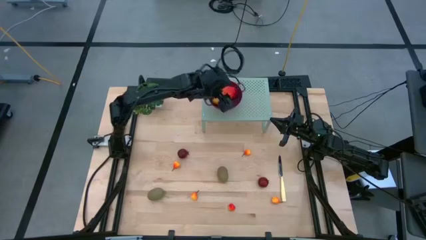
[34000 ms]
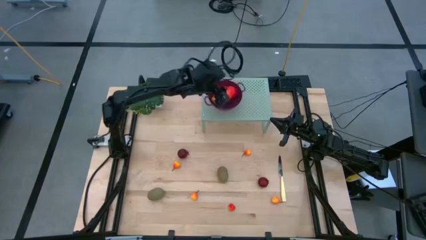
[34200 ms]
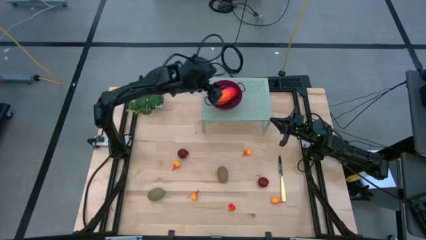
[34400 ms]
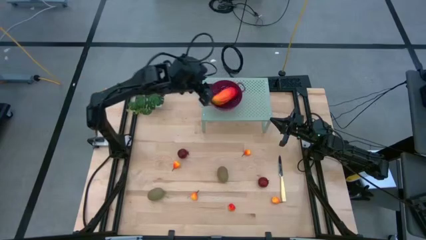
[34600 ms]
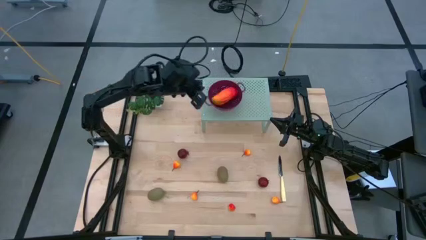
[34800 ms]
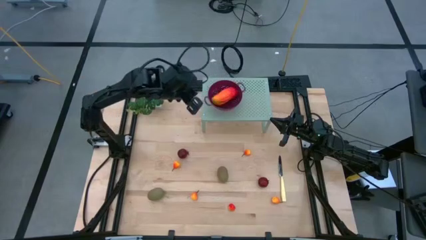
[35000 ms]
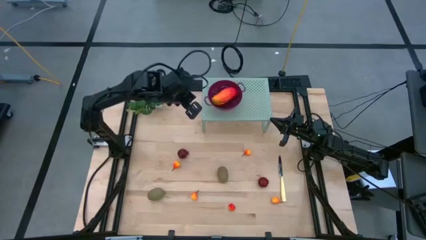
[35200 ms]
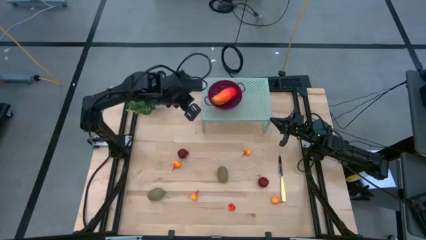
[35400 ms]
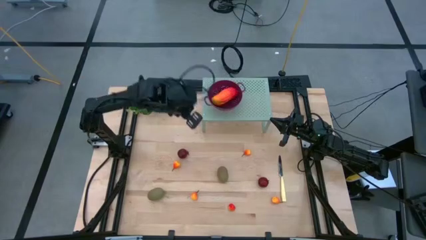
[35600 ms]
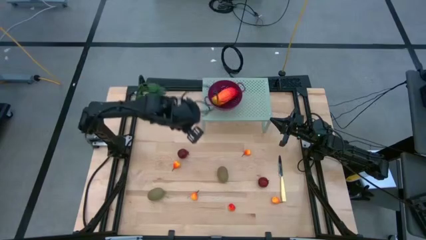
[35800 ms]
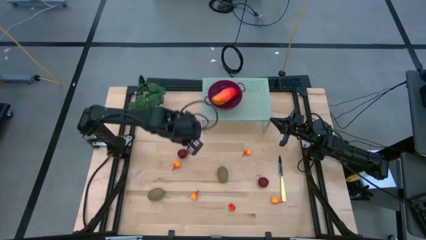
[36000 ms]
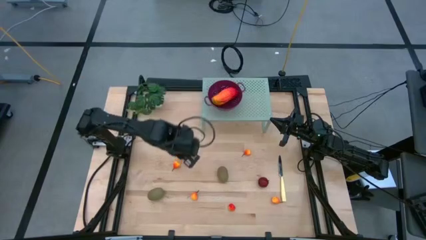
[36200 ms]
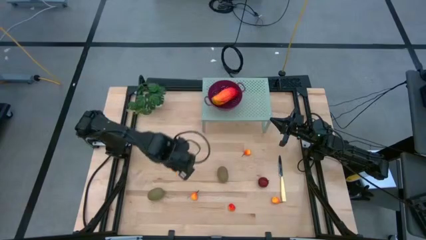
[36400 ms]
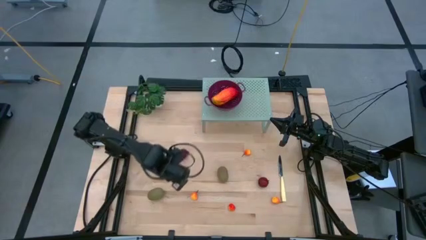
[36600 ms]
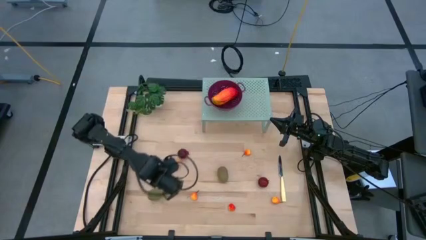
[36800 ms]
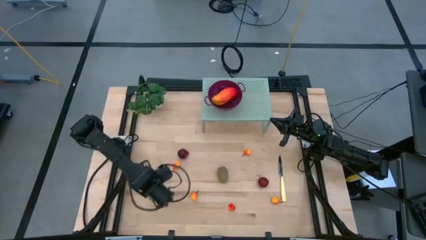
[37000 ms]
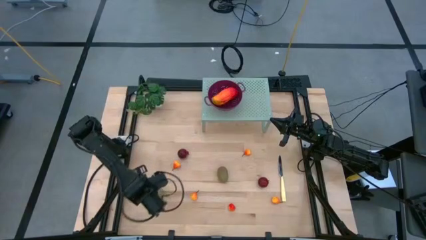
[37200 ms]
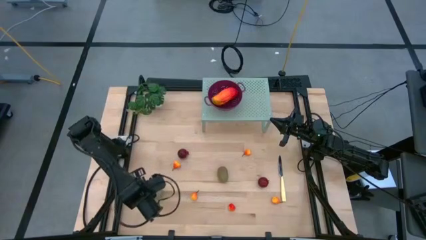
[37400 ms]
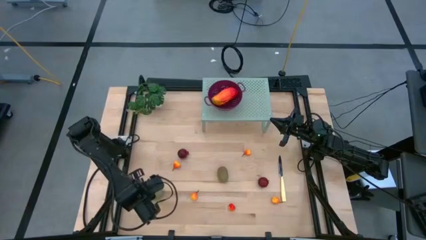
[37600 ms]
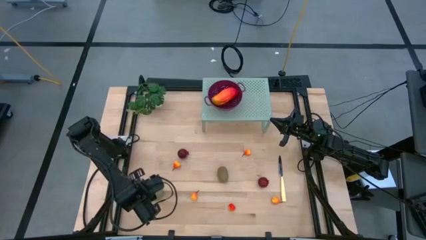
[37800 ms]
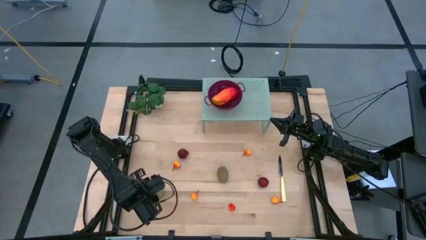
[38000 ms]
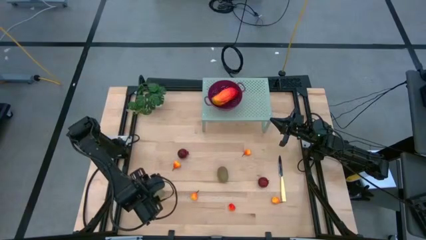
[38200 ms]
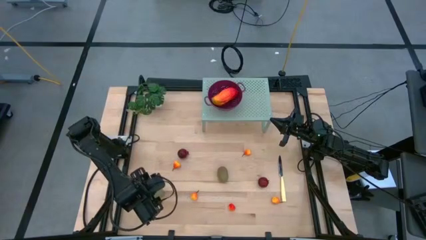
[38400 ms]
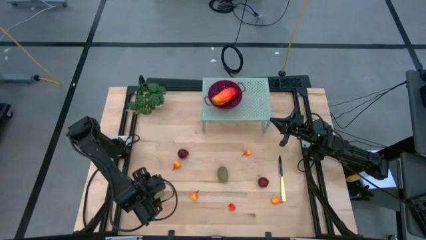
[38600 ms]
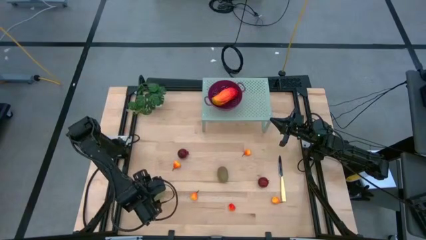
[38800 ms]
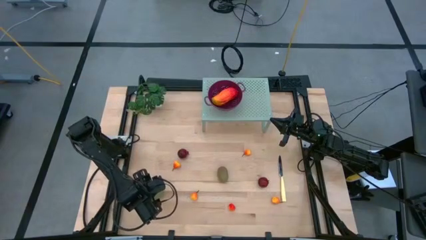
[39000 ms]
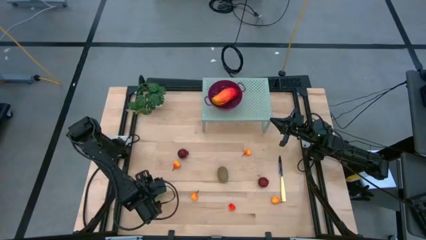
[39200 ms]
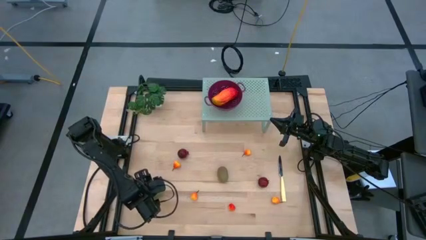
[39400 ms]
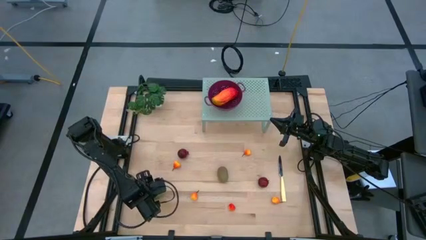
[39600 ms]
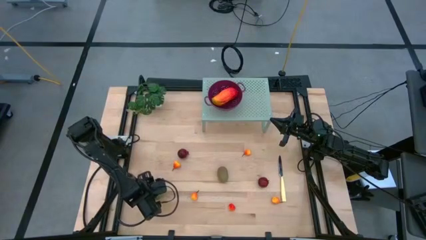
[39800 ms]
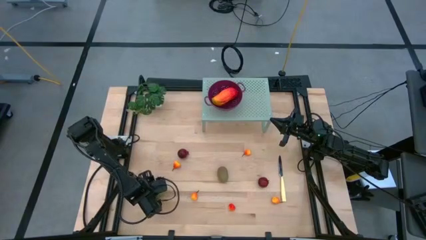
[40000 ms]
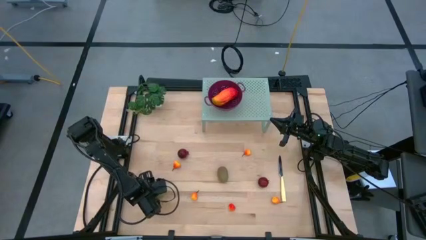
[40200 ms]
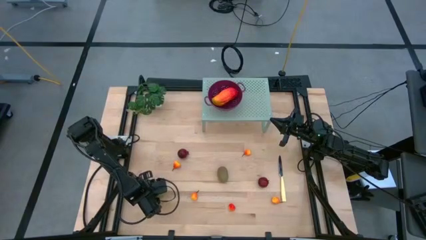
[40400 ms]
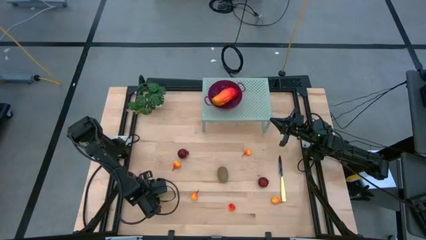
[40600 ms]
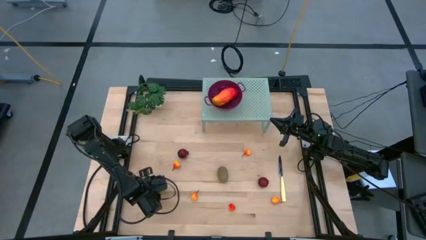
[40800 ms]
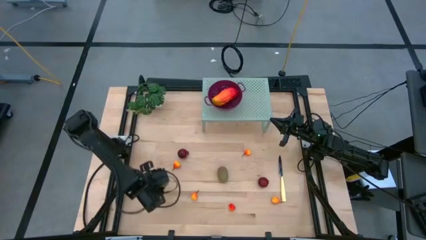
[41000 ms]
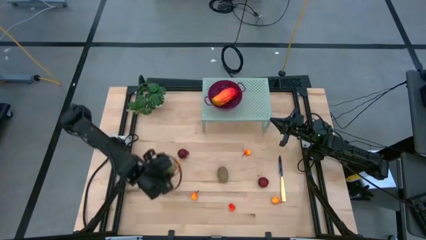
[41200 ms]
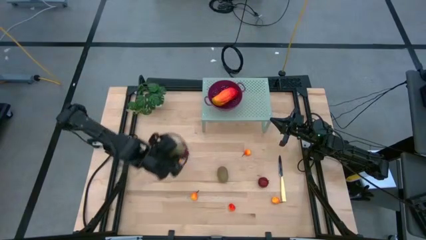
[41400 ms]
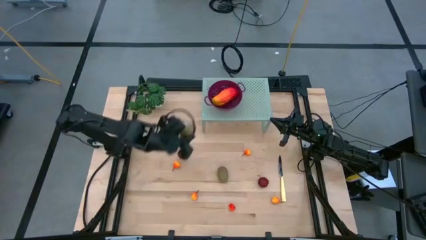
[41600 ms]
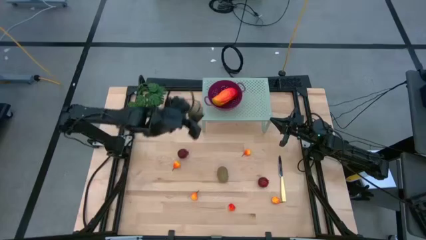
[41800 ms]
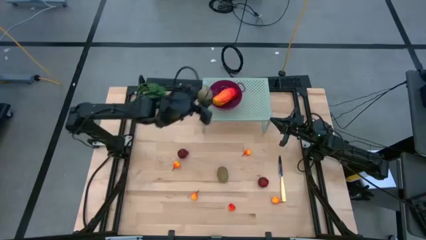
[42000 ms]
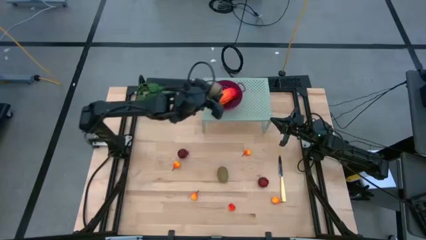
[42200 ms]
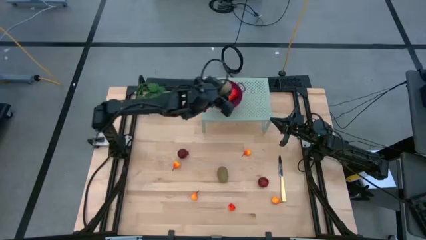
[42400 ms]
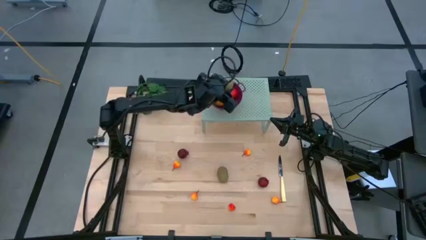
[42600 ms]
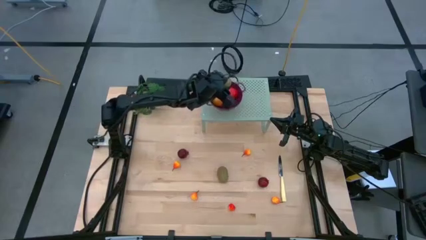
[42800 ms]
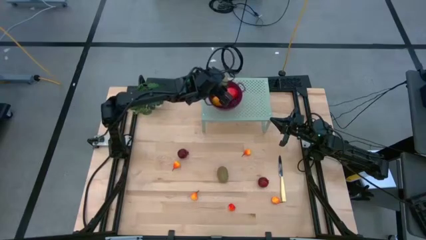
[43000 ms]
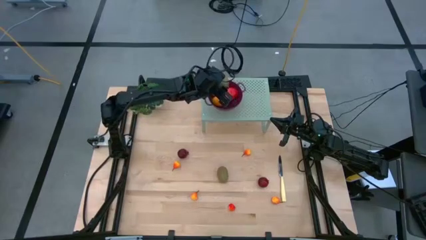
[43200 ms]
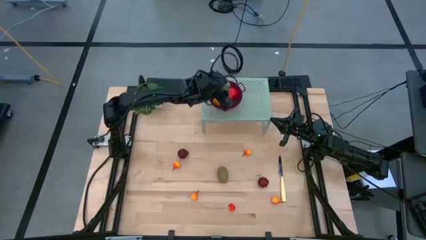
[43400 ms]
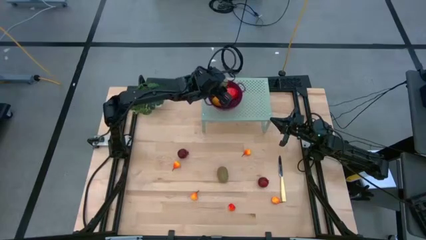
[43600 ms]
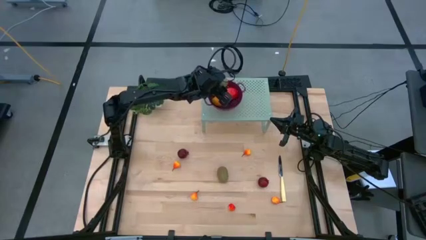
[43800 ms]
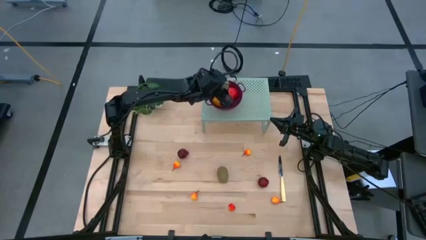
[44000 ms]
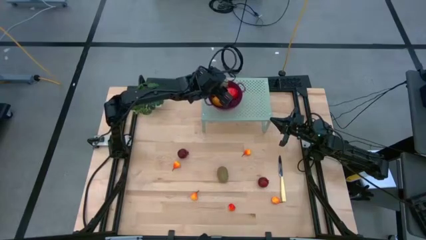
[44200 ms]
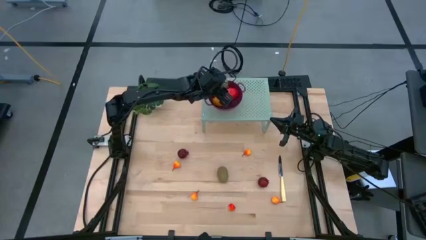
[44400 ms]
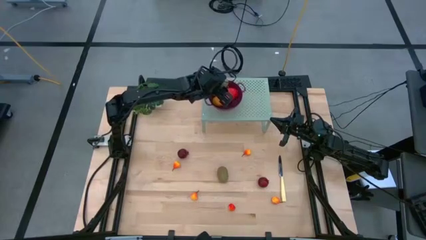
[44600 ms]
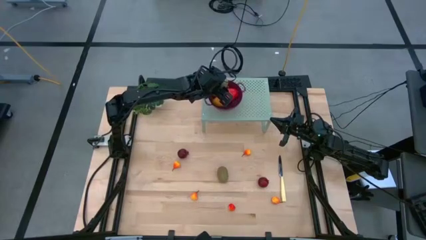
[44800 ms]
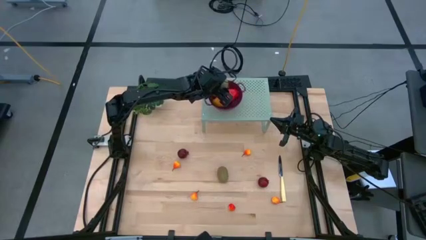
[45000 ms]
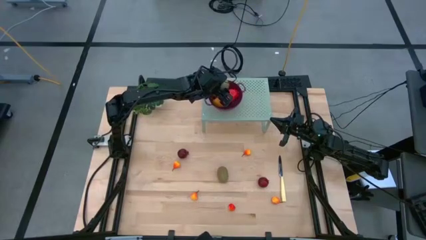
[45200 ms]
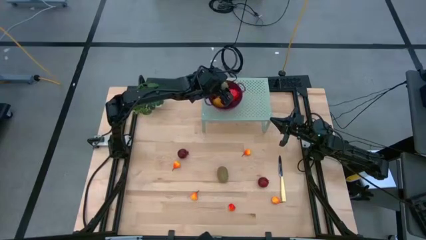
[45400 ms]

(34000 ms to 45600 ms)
Task: Pick & Place Fruit
Put the kiwi in the violet strainer bowl on the shelf

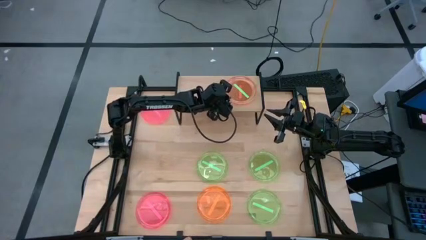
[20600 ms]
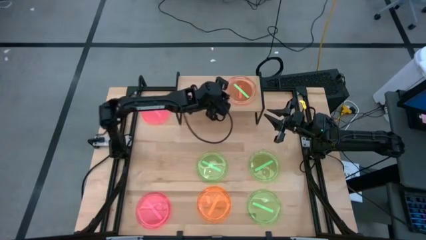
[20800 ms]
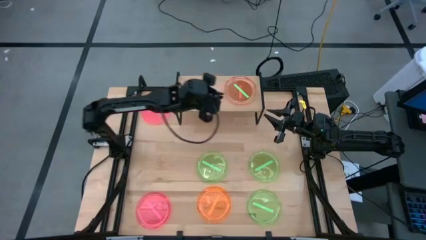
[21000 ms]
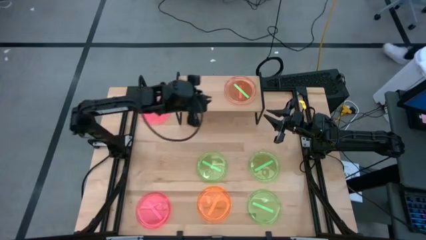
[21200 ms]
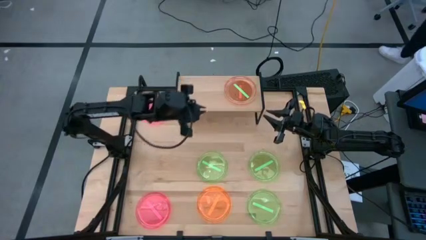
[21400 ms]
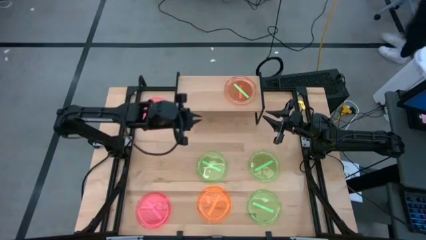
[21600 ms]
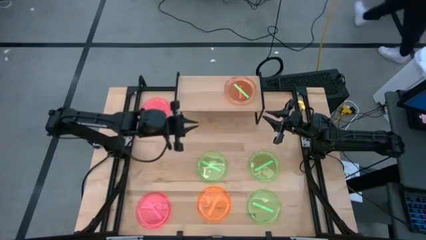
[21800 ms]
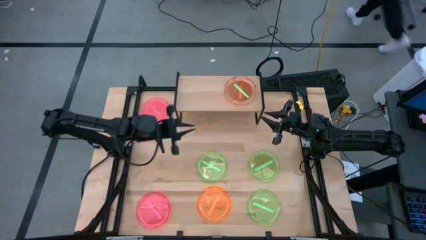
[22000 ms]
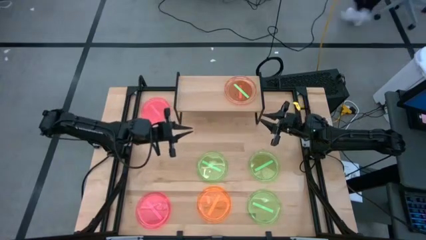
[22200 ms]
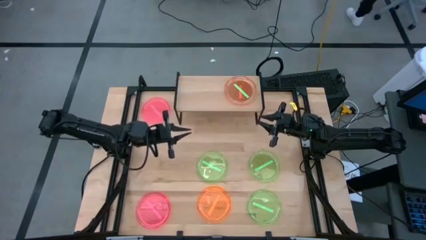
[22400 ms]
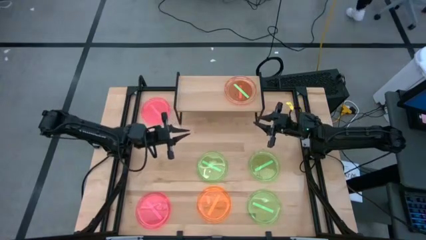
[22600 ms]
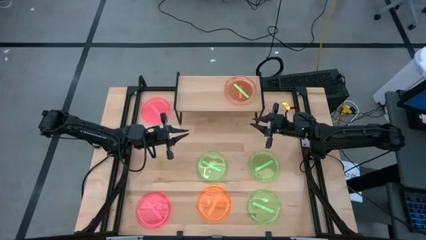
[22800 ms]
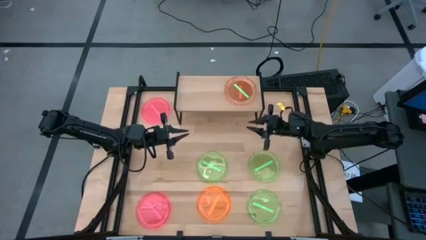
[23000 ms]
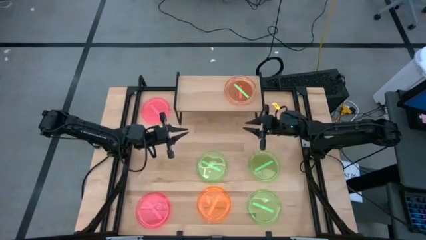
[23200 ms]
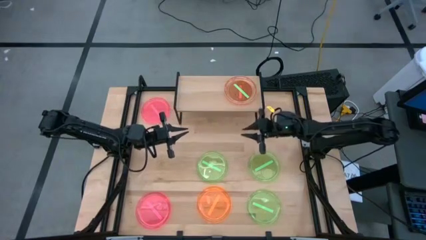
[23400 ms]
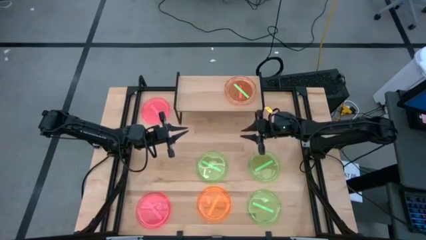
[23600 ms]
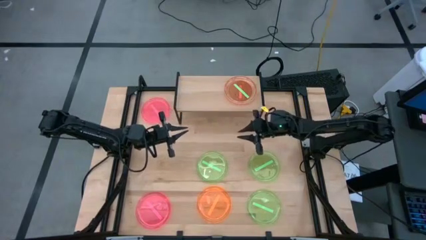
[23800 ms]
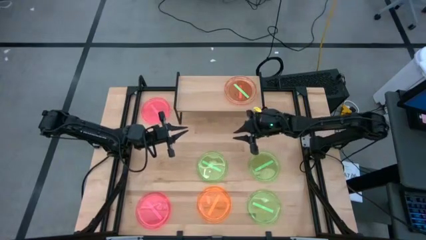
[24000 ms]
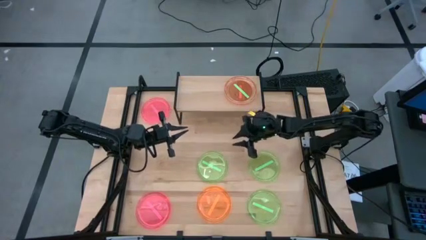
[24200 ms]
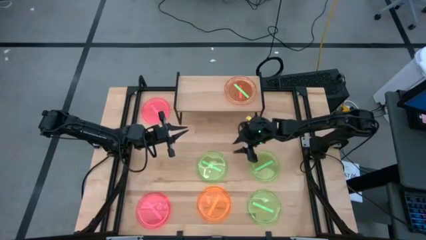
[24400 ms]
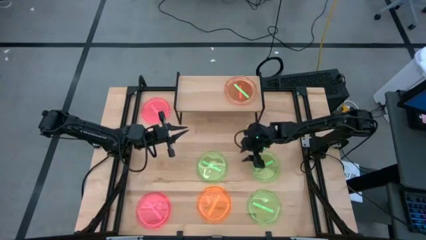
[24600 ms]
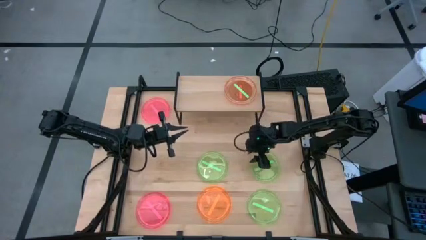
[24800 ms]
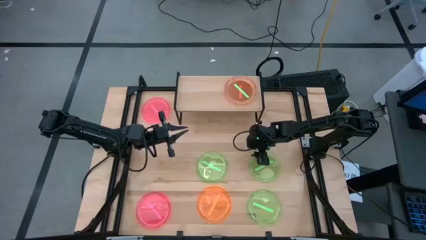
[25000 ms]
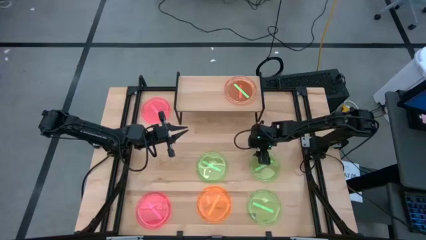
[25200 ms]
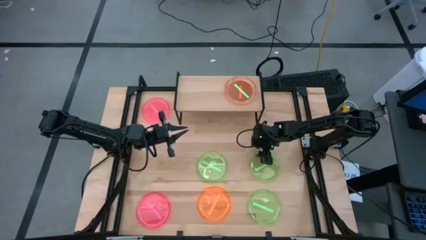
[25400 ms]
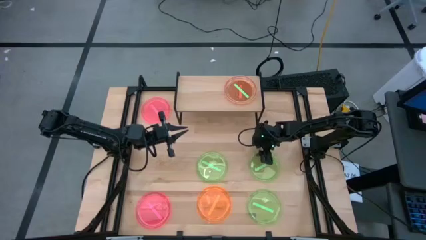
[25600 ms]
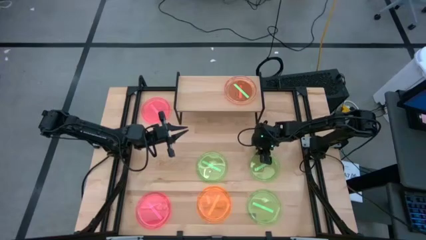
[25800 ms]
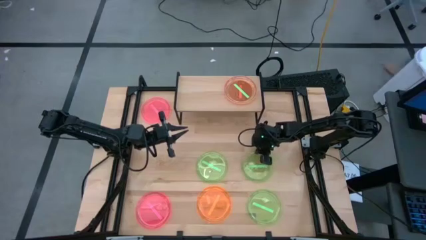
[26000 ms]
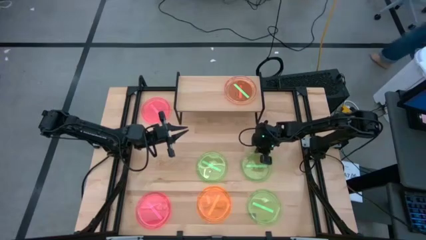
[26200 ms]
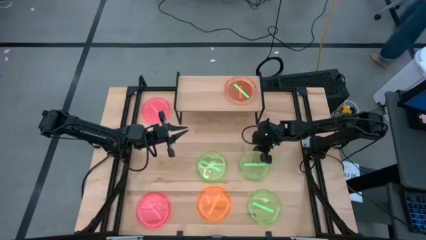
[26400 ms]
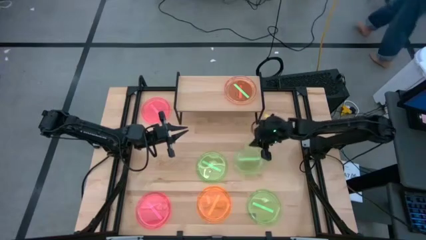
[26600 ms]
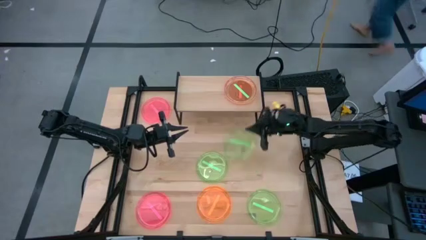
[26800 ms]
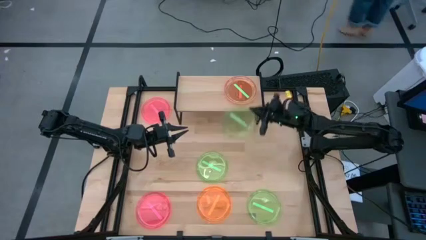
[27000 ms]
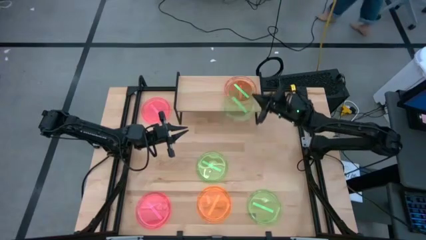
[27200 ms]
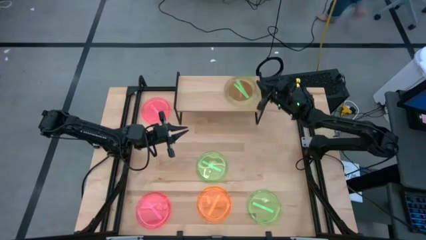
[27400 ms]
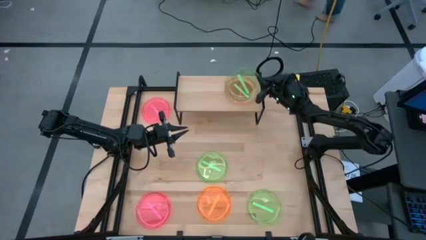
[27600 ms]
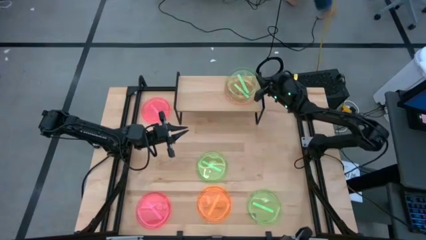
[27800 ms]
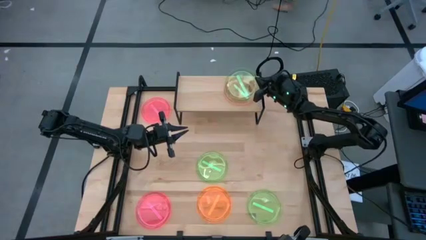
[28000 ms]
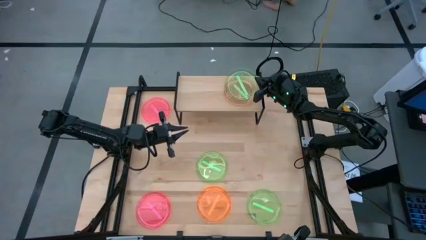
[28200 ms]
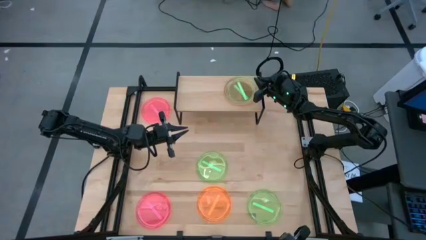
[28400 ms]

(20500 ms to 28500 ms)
Task: Place and stack plates onto a shelf
Stack the top right green plate on top of the green plate on the shelf
